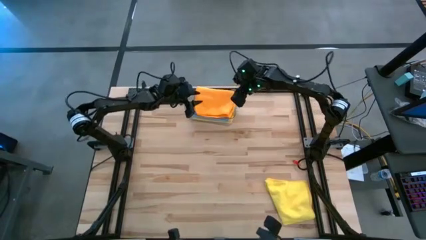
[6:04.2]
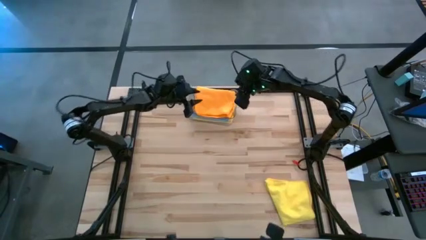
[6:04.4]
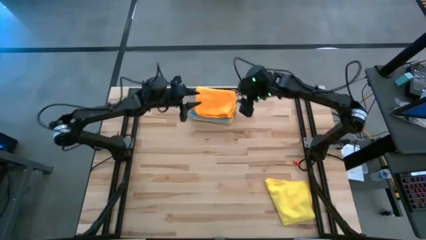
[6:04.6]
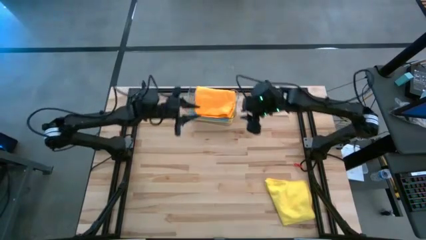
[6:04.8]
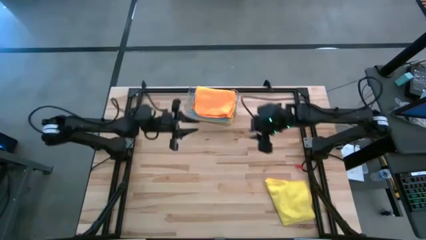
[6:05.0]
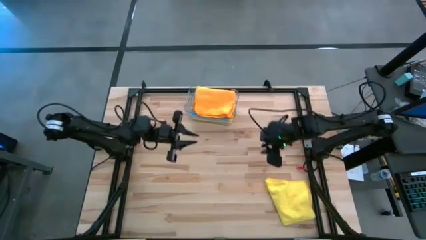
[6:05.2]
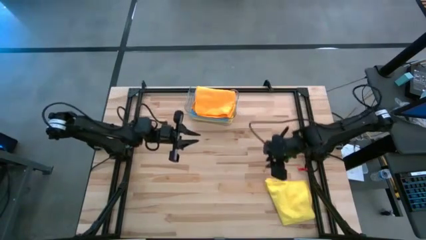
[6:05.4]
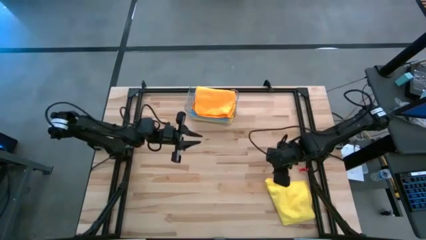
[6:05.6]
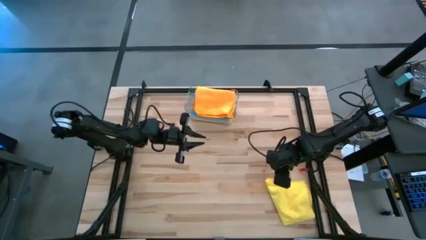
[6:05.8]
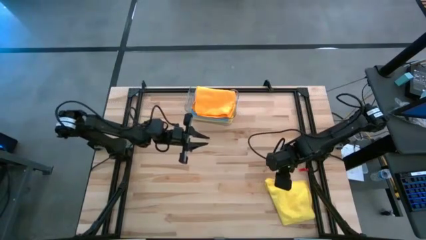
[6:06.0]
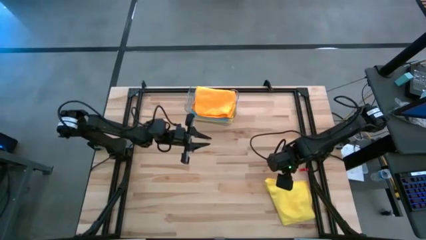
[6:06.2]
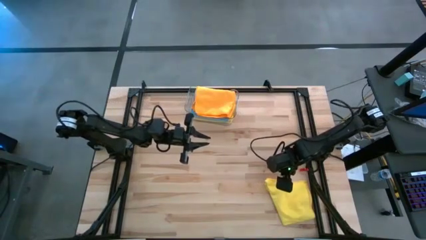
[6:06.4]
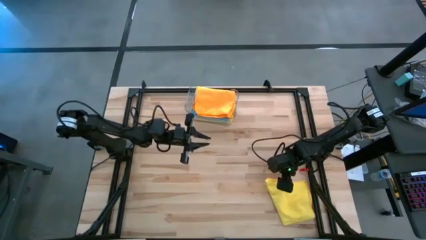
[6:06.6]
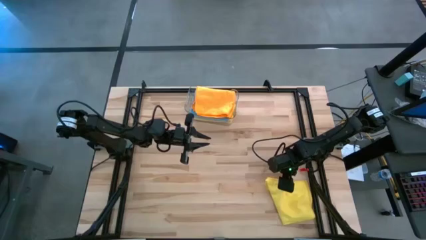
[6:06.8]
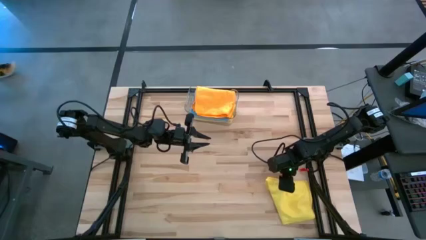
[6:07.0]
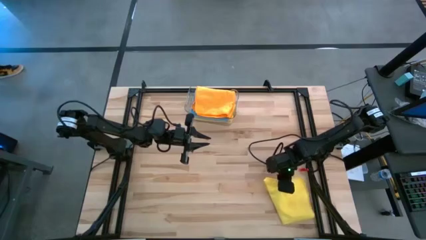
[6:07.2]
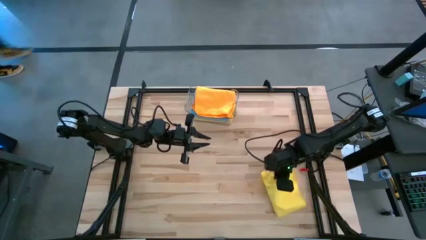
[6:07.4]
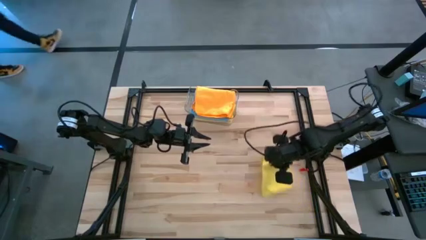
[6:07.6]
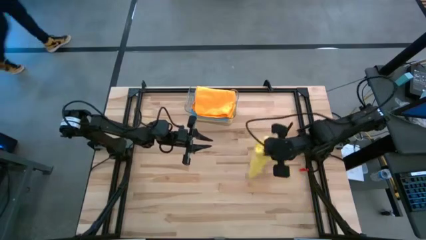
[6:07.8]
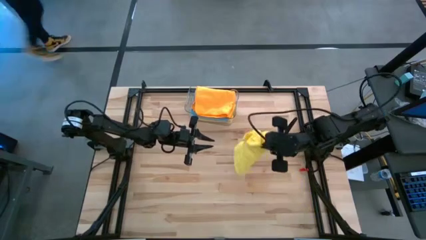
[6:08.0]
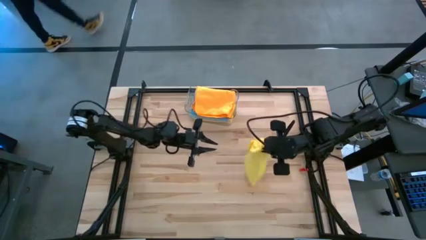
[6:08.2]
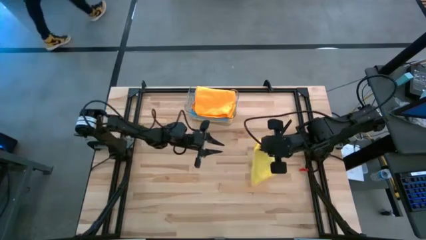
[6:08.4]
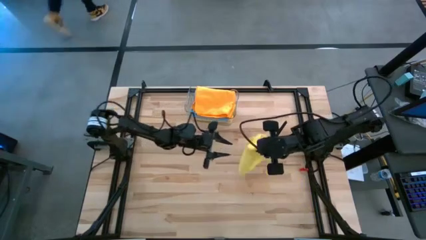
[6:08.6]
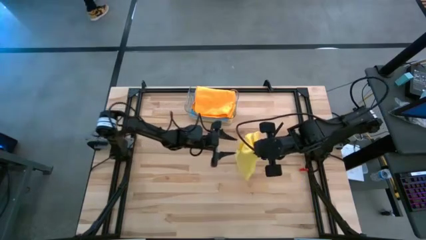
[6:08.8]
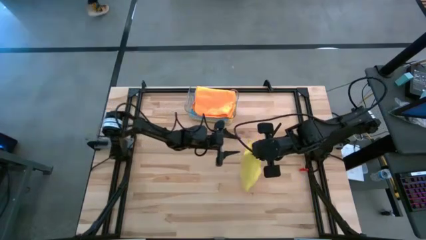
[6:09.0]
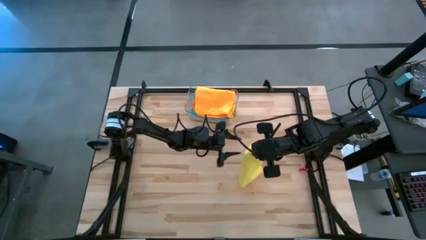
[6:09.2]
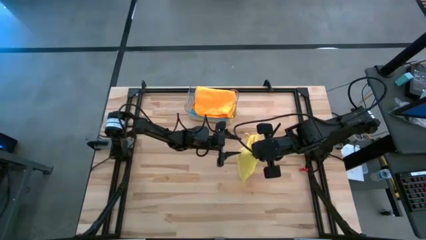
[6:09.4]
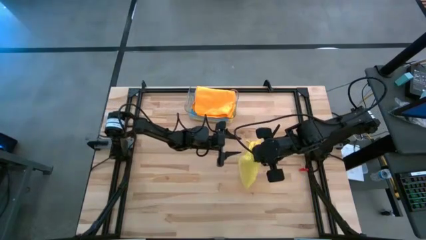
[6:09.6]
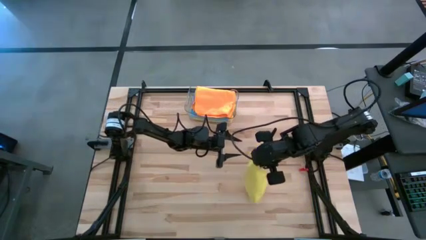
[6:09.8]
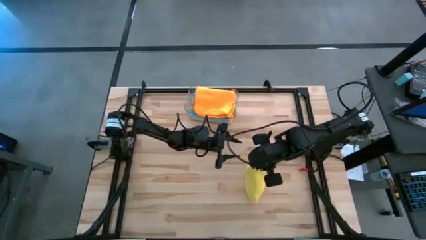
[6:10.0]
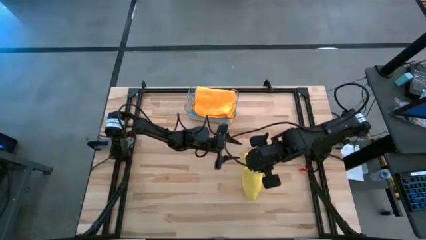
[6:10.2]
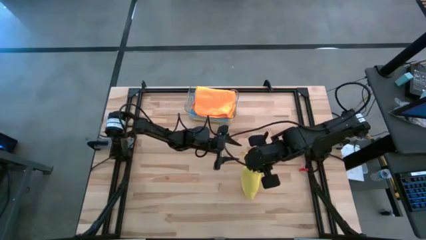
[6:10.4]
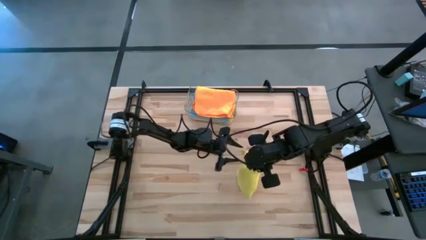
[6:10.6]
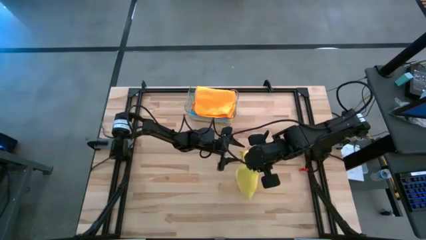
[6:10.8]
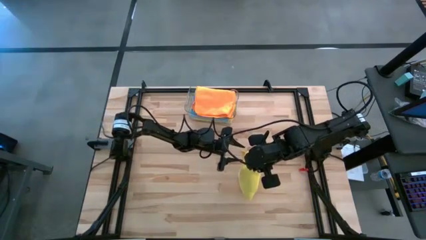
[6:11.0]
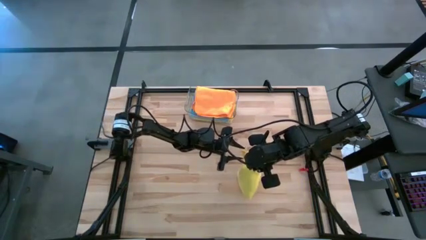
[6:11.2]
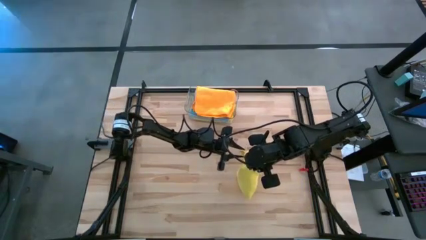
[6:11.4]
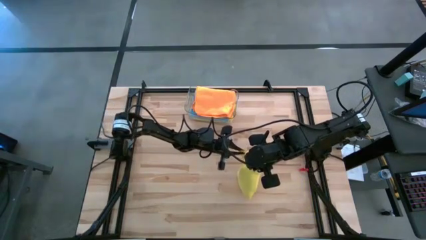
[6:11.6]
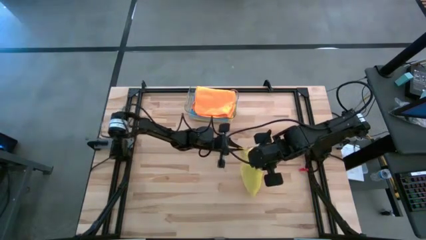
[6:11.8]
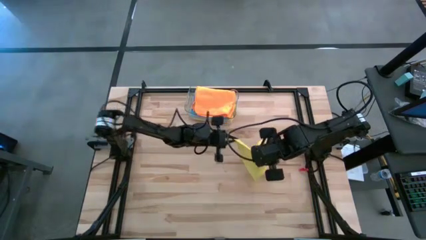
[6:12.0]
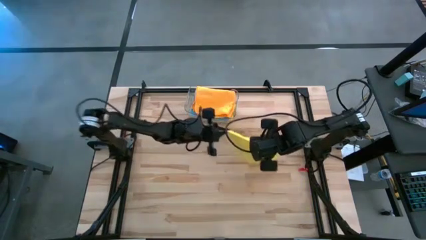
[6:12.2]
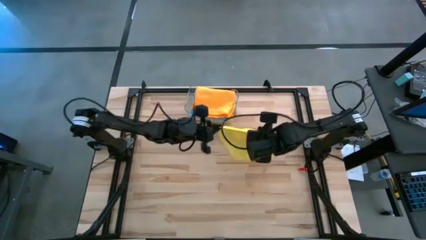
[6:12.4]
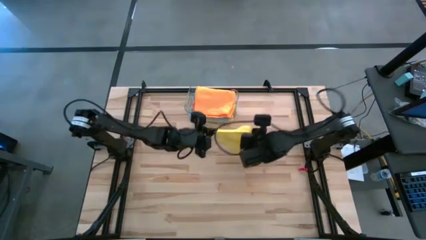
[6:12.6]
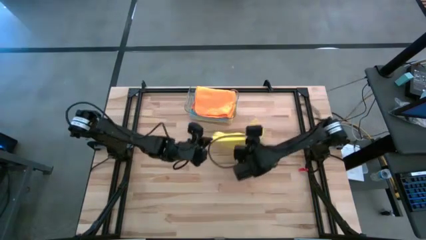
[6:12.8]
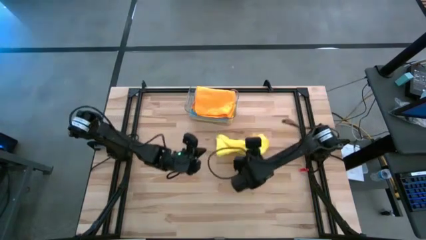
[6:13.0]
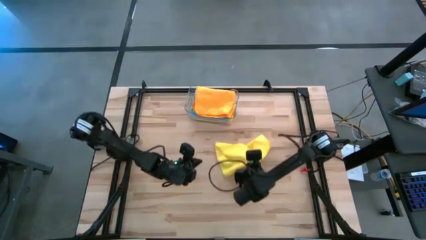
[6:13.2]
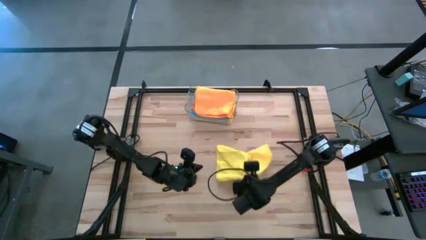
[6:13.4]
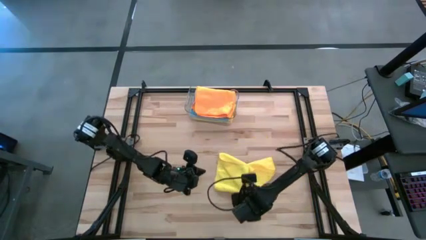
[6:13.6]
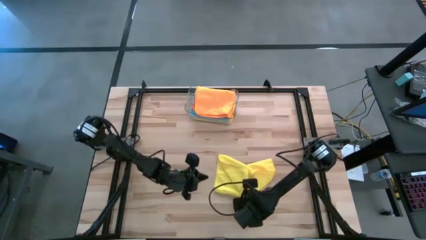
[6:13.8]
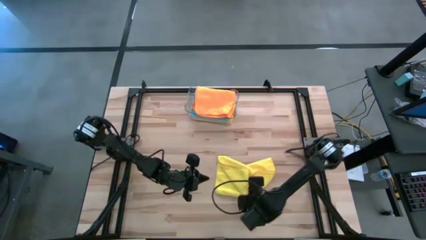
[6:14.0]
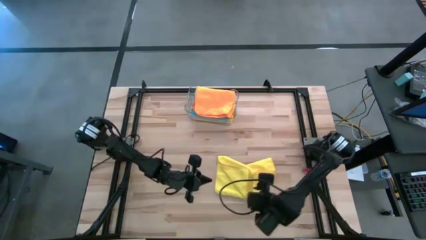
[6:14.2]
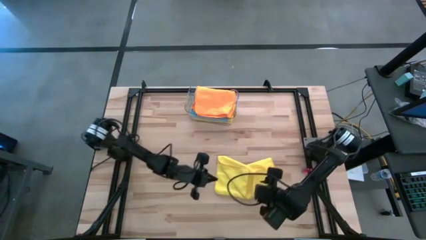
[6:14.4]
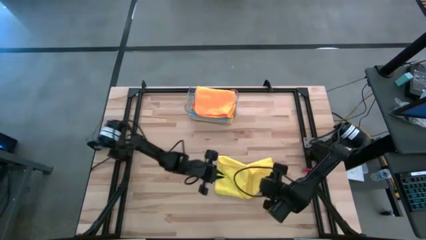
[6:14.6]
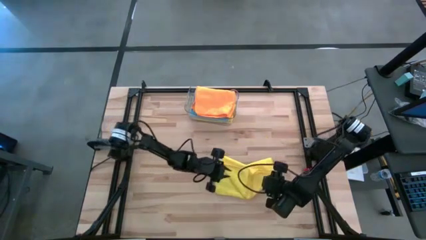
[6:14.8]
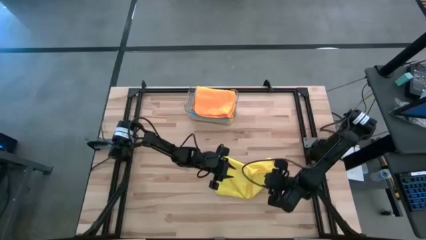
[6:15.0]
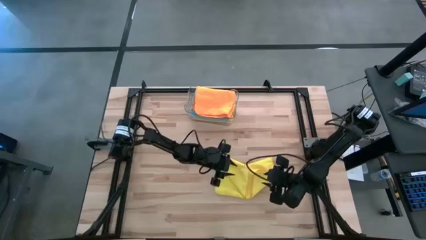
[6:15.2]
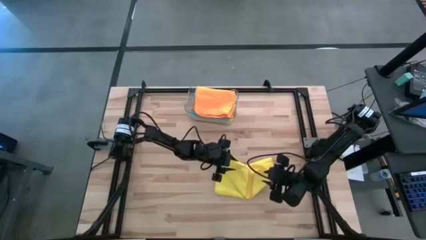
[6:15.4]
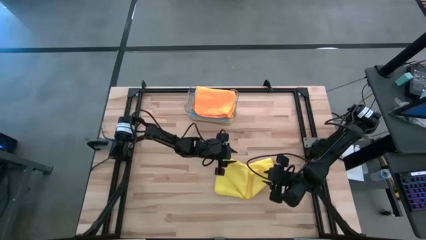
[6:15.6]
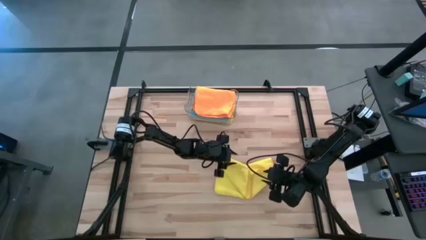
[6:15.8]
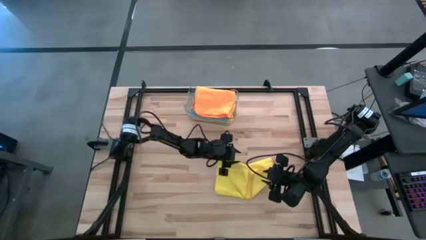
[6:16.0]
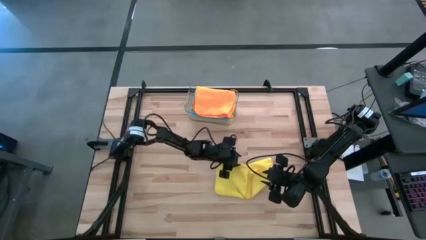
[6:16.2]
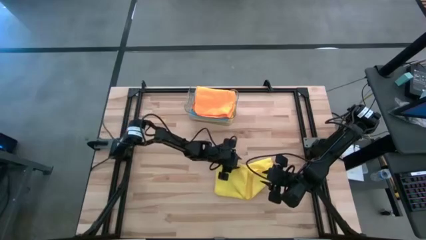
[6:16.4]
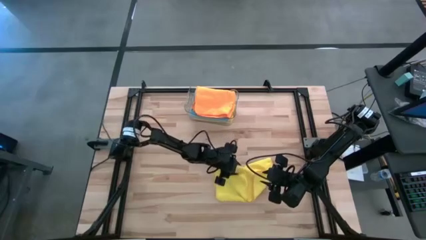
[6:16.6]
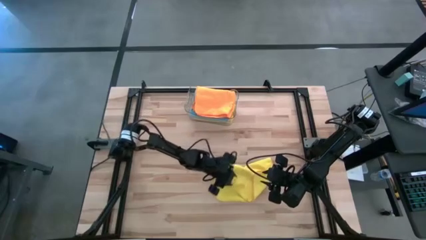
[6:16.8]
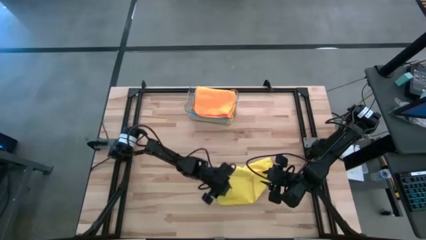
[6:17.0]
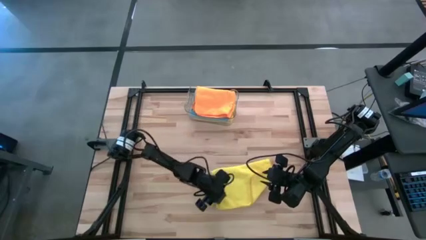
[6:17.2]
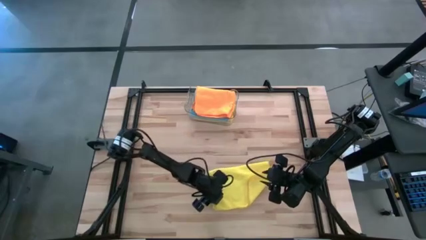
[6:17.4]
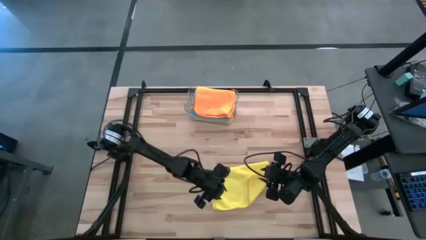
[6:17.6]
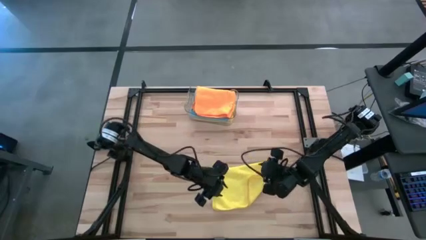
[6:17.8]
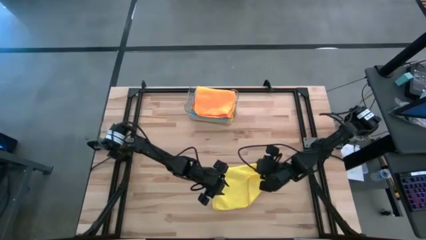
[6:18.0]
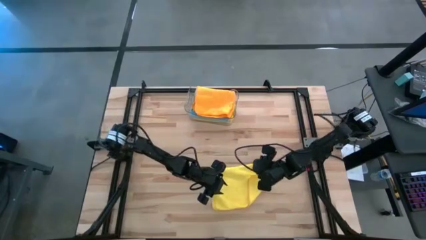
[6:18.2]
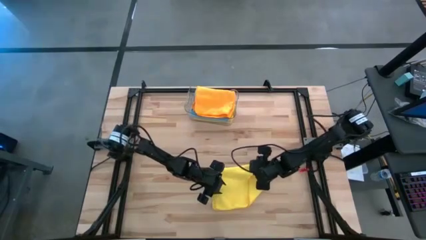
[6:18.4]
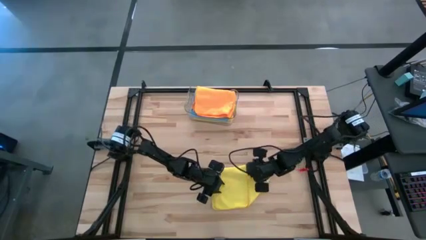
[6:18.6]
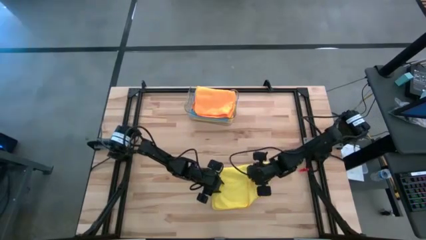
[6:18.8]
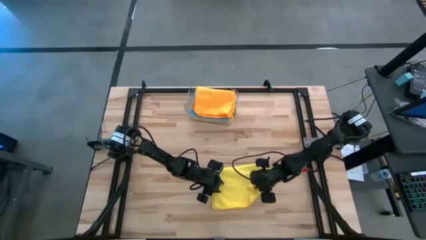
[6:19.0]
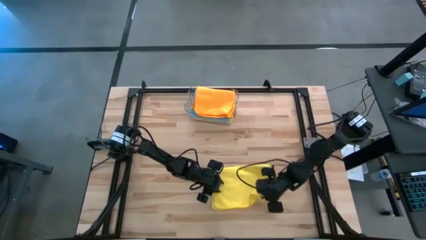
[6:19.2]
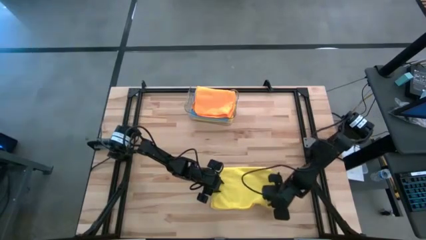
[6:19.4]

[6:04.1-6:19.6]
Task: Fold microfiber towels
Fold the yellow microfiber cloth
